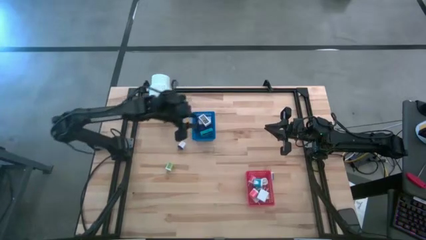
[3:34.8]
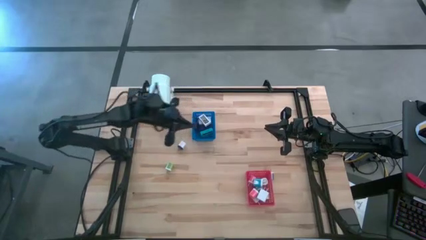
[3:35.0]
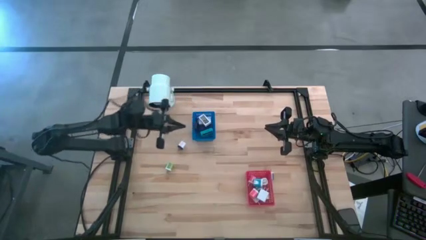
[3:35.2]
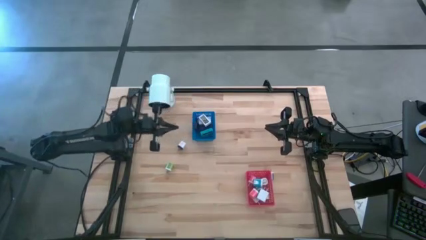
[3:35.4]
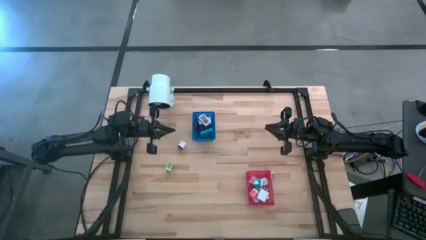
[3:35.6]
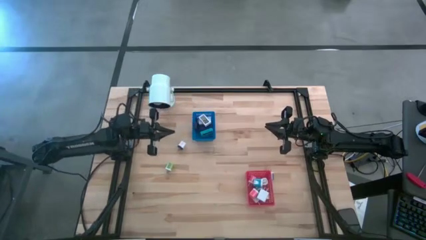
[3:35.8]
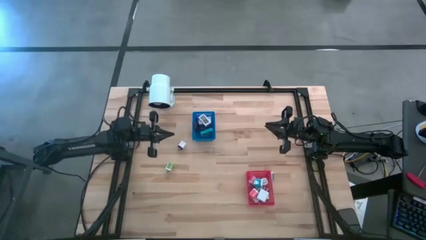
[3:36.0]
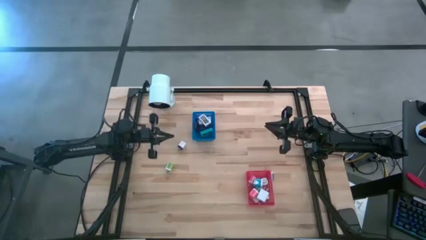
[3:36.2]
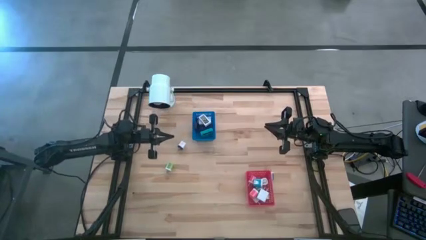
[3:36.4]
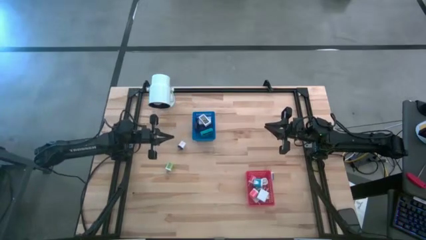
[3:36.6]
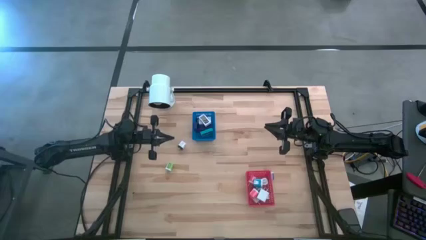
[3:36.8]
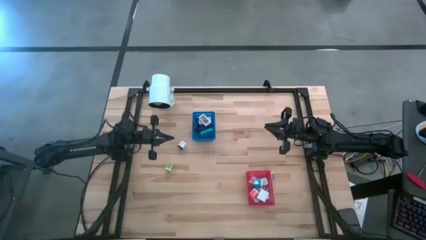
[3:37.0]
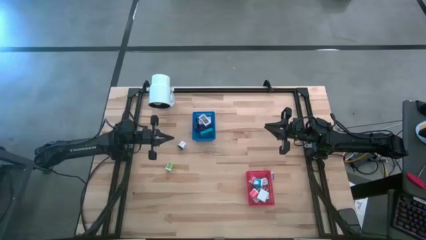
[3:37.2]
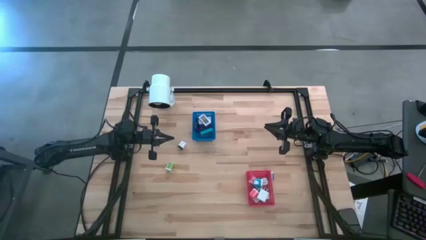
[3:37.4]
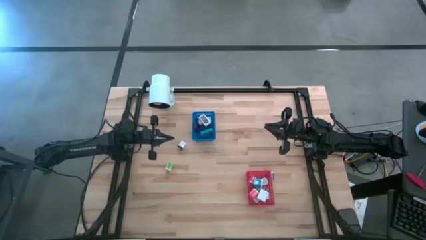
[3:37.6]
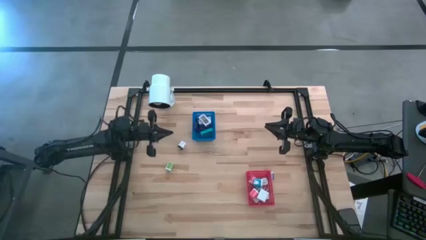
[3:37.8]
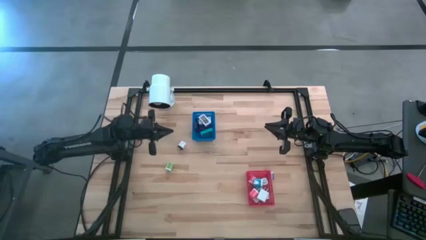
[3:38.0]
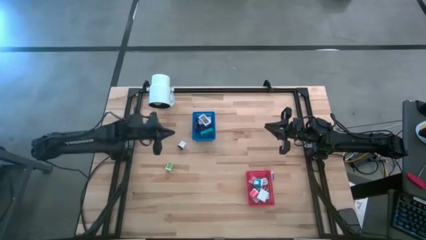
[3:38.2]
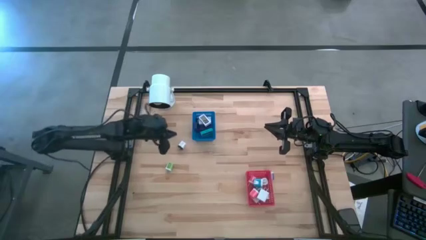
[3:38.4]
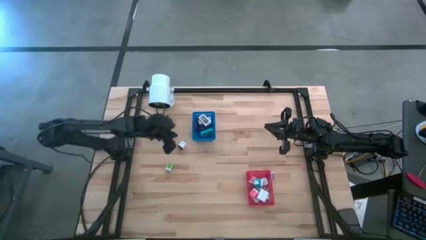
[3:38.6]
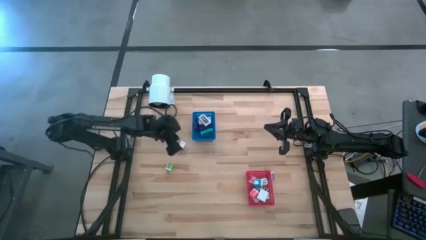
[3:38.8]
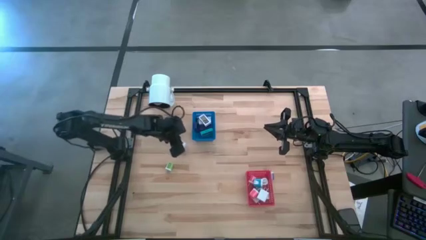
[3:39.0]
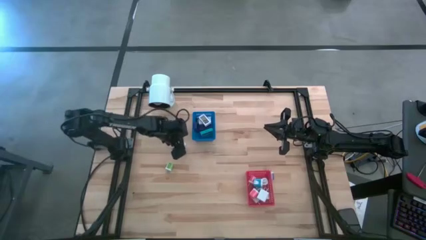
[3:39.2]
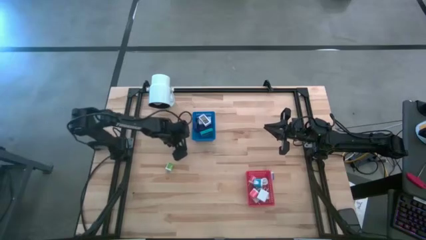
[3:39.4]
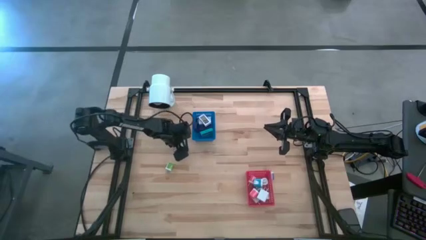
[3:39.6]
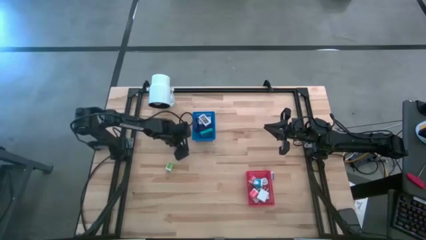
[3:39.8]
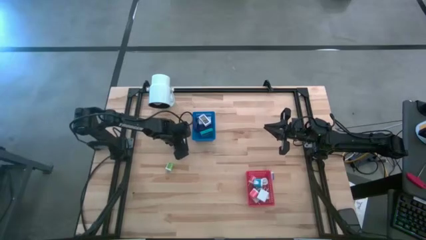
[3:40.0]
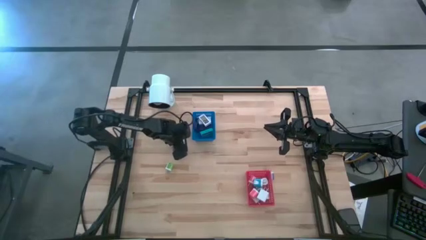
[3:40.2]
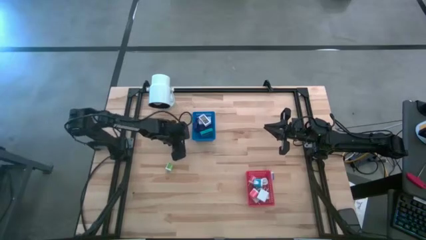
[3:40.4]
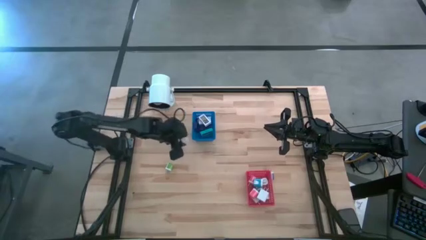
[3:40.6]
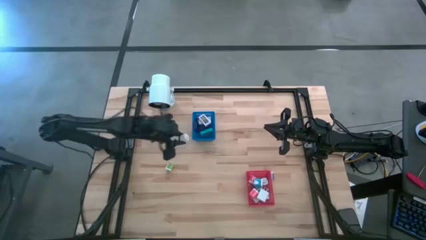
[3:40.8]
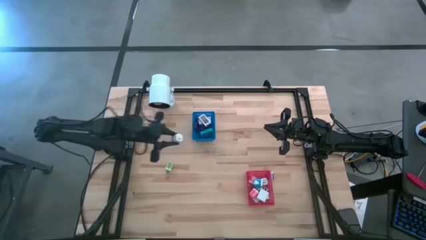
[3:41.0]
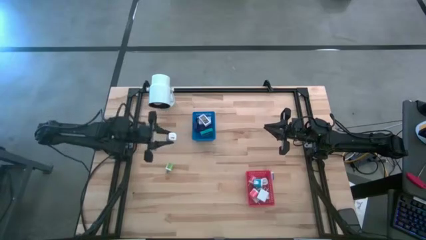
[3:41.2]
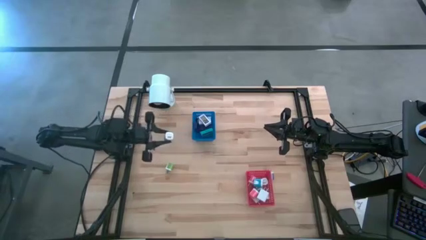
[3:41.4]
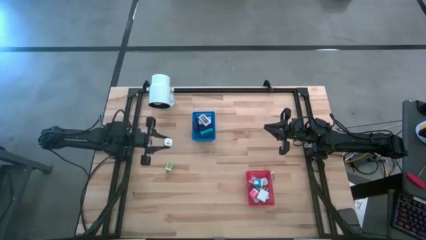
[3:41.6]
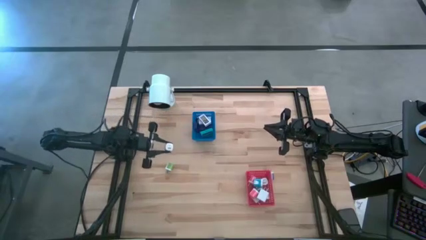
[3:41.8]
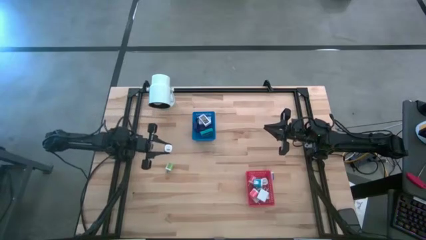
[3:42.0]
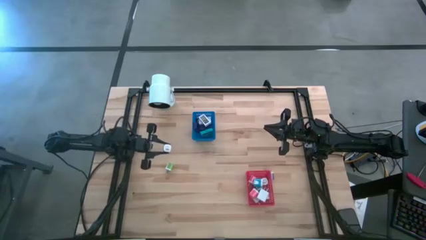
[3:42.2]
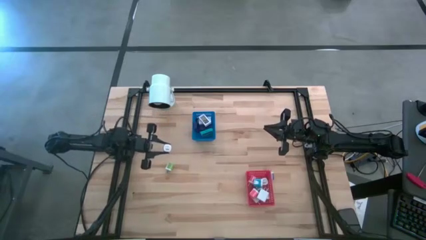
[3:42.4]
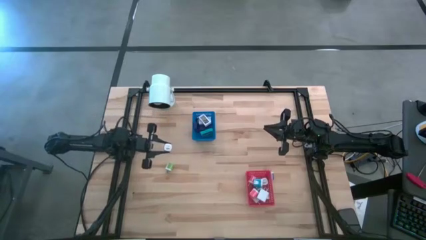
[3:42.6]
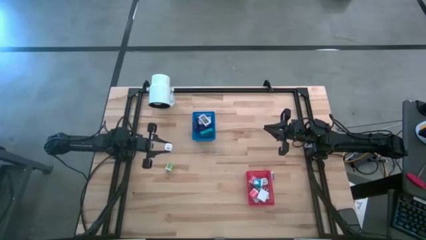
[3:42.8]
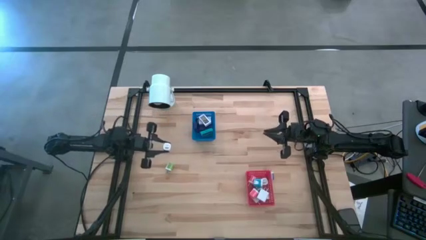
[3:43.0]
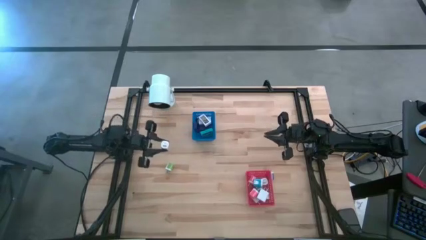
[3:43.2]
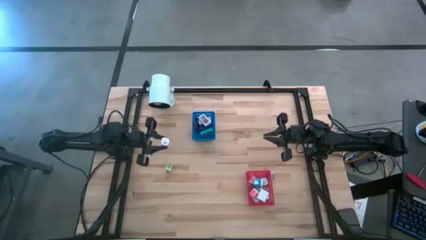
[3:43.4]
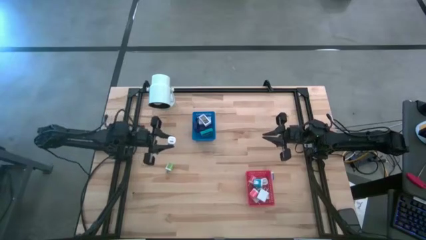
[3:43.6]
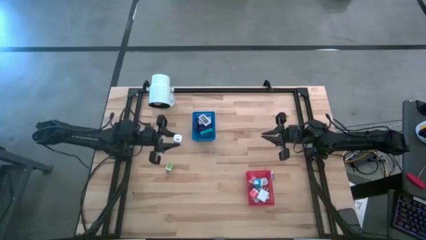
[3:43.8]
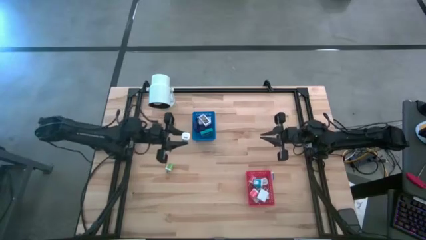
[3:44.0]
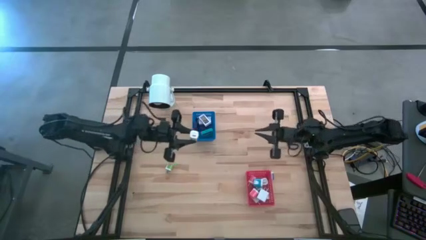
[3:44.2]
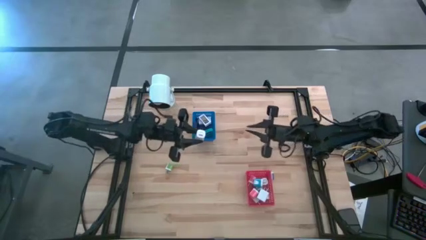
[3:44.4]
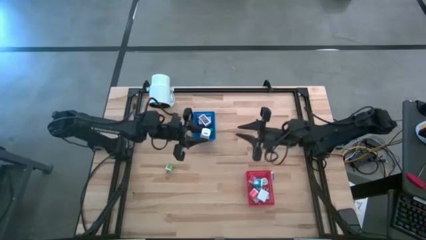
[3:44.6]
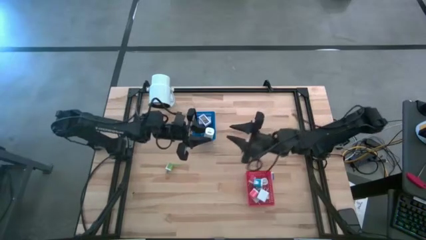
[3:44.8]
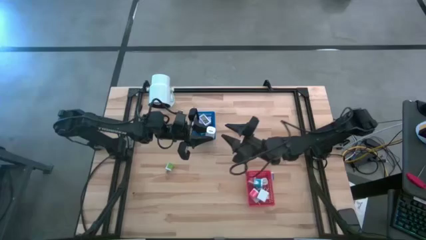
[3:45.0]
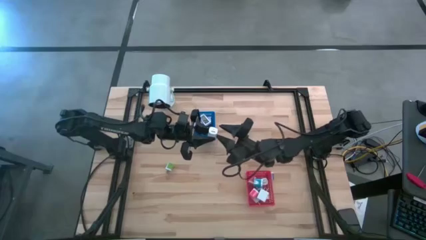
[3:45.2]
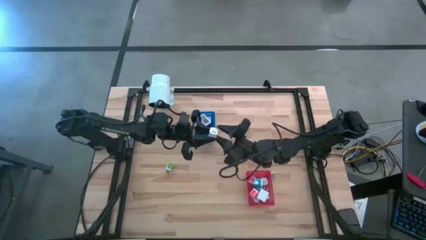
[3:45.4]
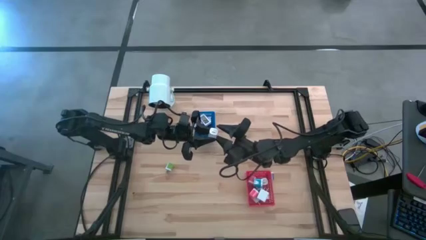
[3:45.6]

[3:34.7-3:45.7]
Task: Pick & Place Office items
Put the white and black charger adapter into the red bin

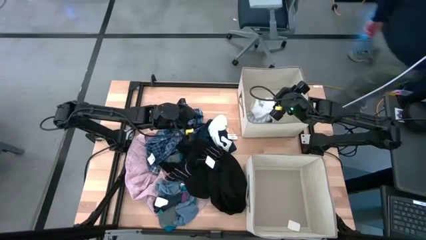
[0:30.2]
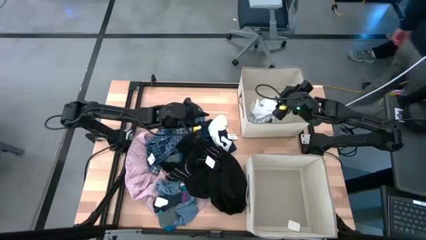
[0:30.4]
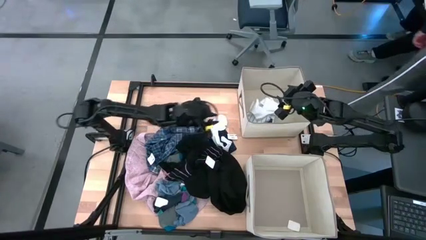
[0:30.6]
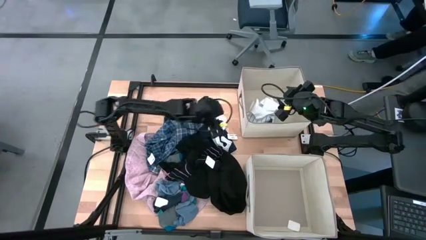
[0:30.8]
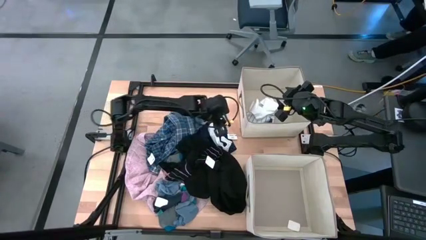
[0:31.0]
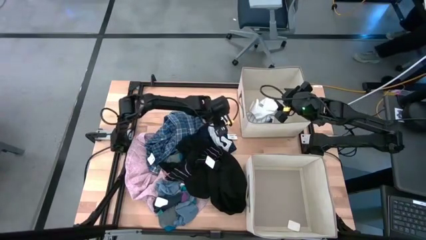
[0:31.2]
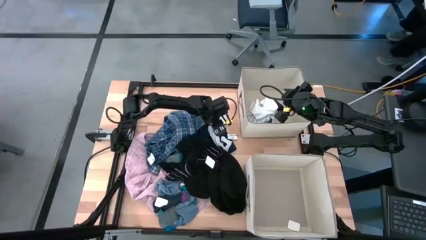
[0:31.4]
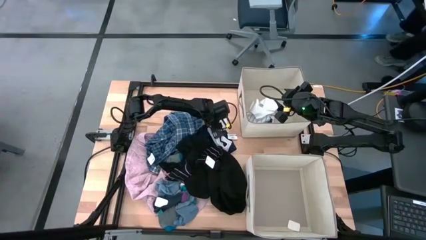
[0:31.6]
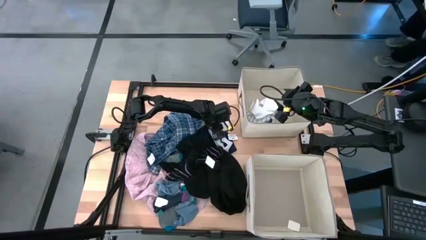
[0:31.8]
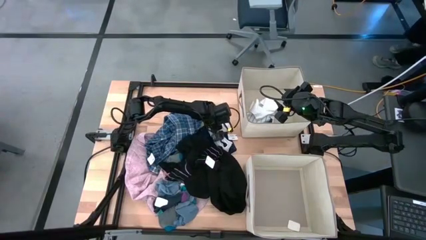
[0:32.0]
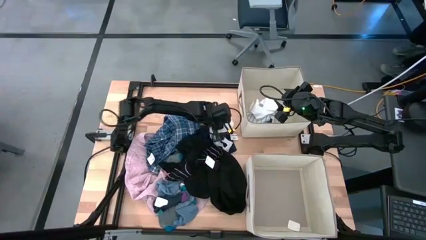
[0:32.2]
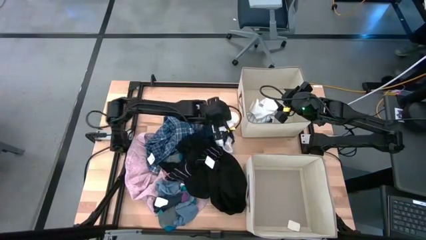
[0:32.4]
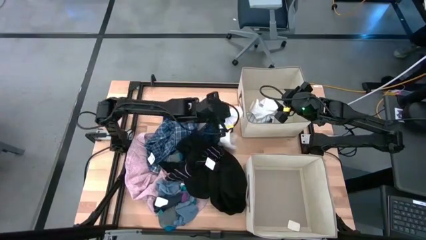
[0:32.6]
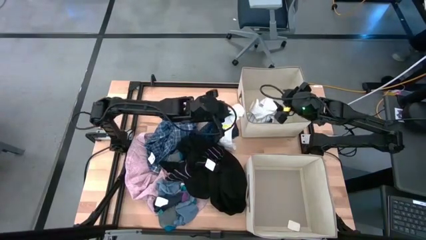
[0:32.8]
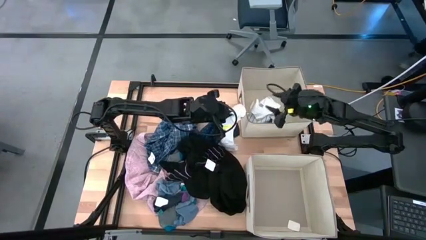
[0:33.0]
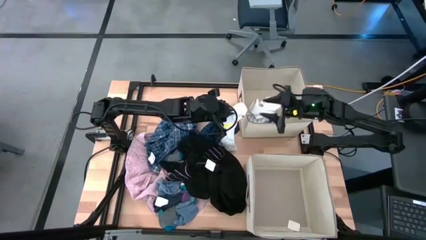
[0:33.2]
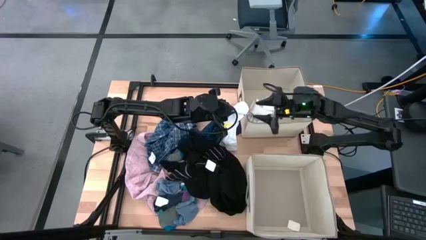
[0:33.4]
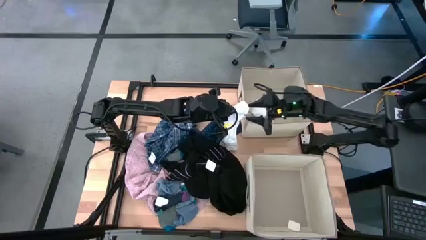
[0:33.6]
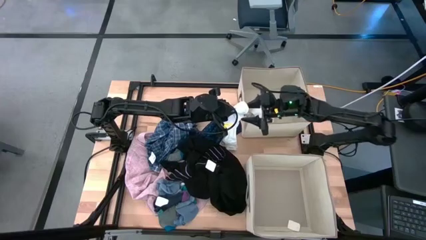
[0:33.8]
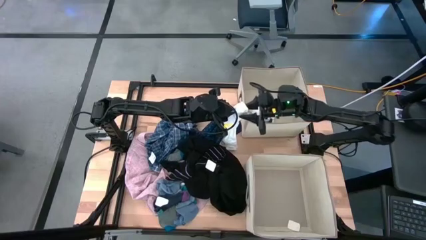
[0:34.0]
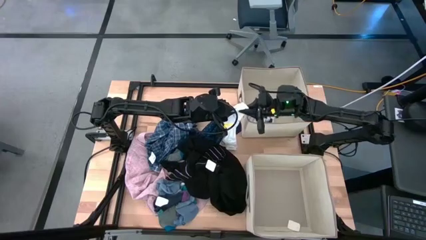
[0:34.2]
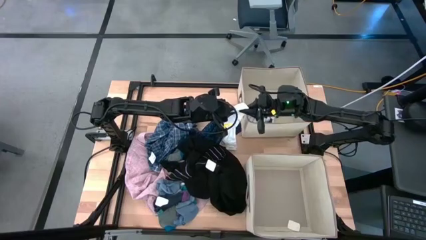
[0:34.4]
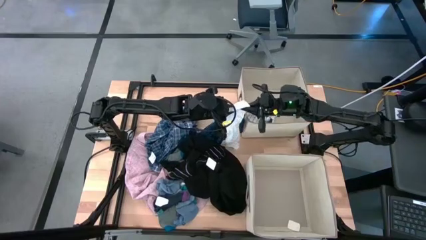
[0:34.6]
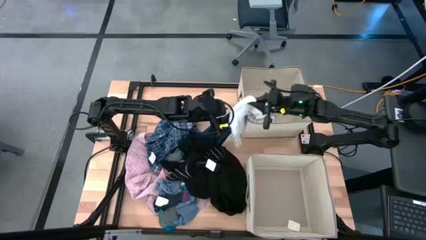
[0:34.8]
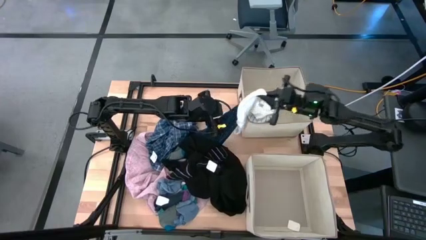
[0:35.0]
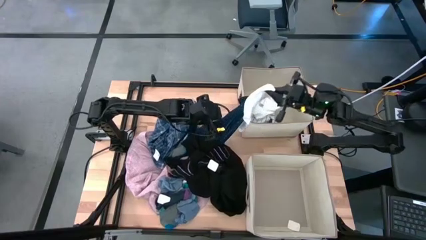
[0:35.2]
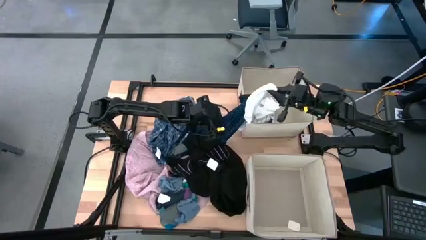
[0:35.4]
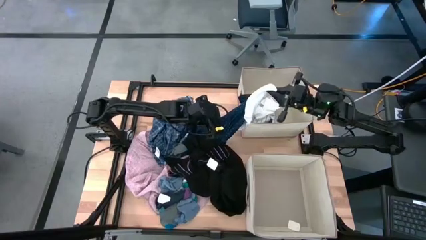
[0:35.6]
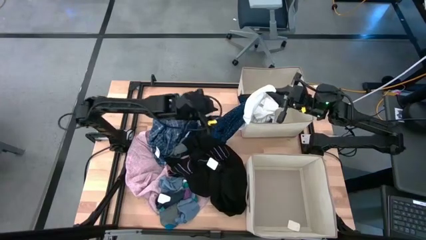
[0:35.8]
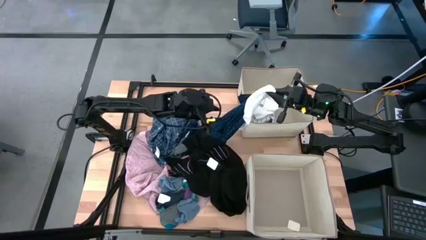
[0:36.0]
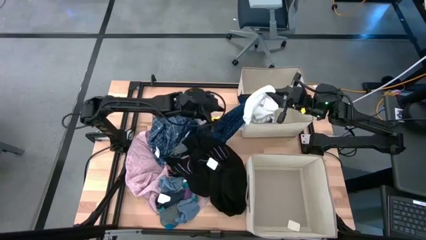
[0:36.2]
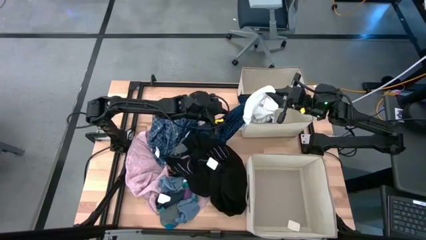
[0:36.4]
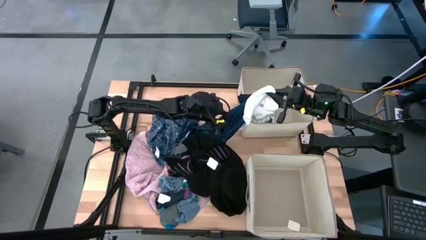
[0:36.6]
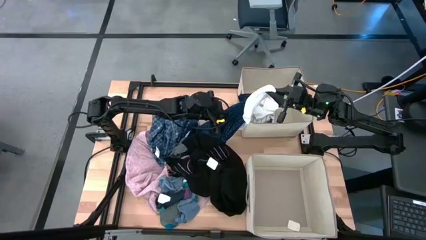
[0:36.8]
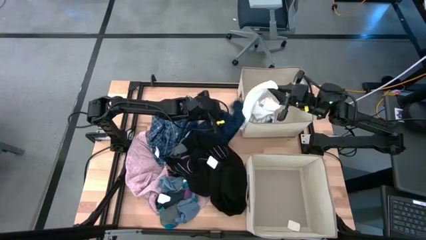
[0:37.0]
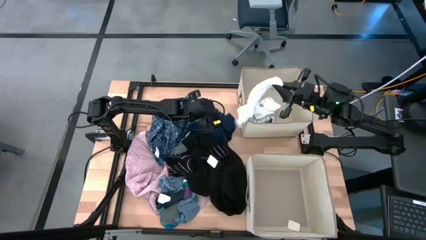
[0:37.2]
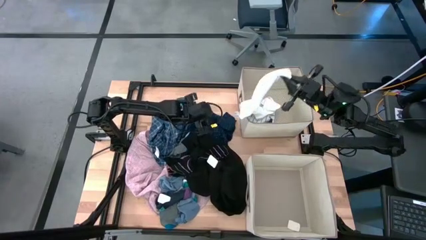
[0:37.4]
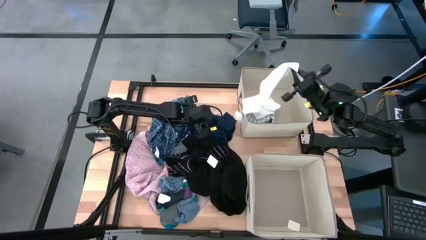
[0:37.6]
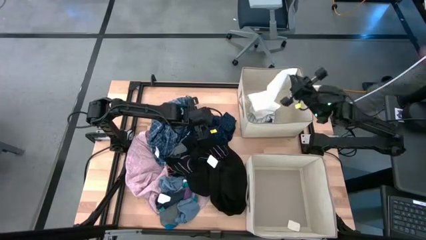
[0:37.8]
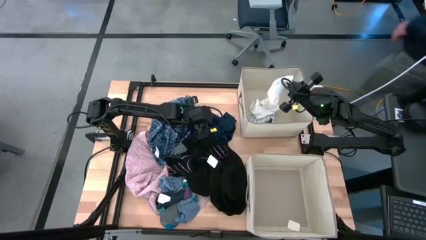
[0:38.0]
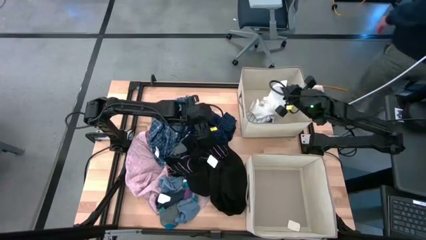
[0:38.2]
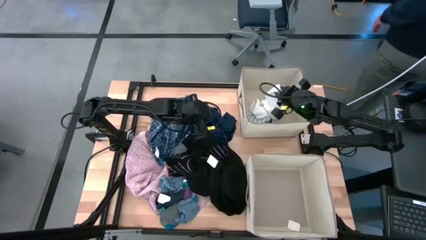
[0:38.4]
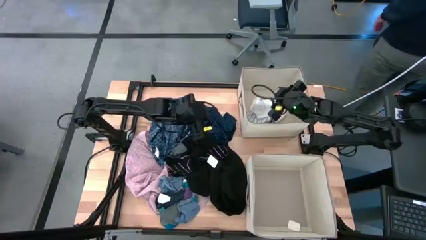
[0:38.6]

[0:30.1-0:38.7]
Task: Sort clothes
Put the white long sock into the top laundry organizer
